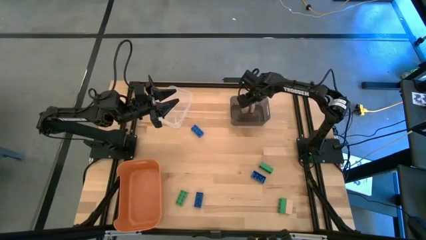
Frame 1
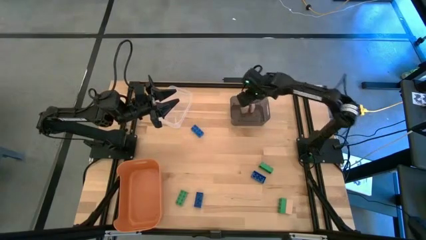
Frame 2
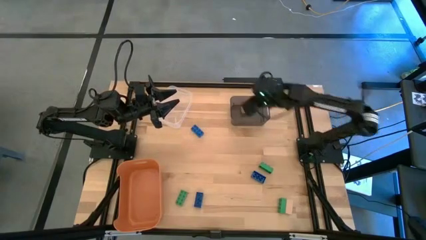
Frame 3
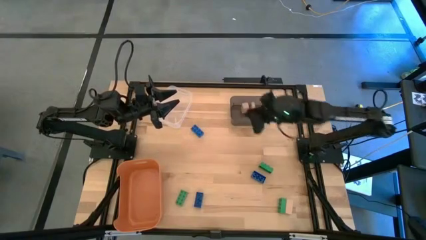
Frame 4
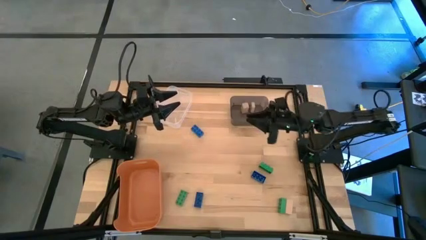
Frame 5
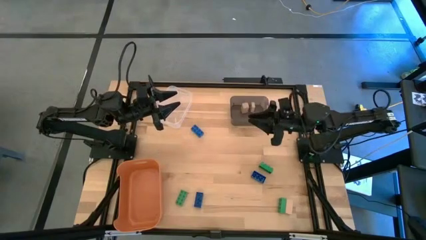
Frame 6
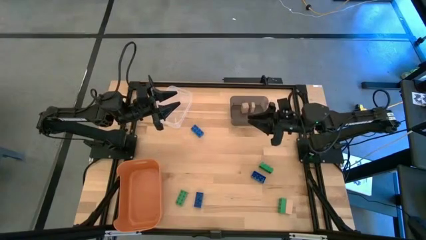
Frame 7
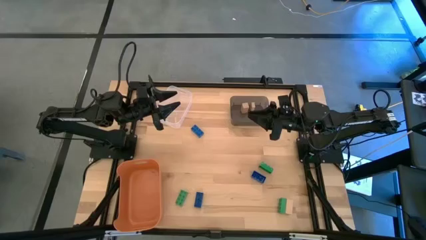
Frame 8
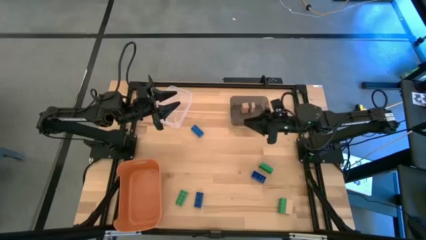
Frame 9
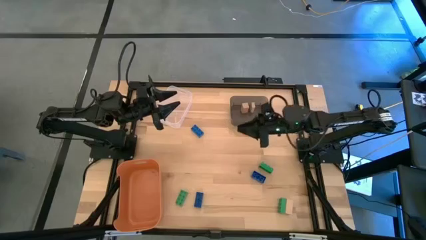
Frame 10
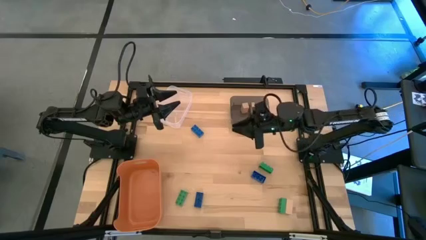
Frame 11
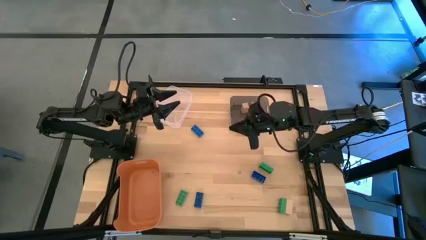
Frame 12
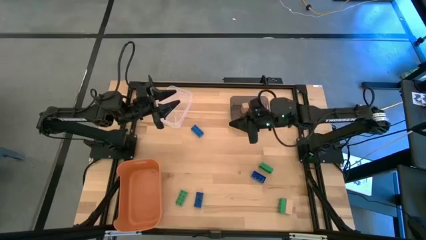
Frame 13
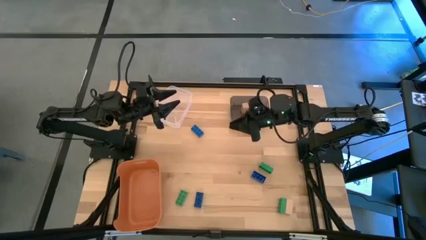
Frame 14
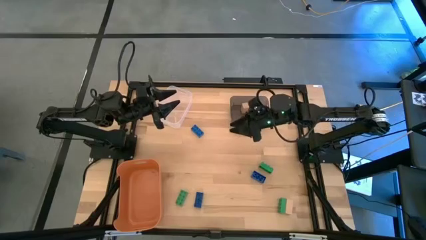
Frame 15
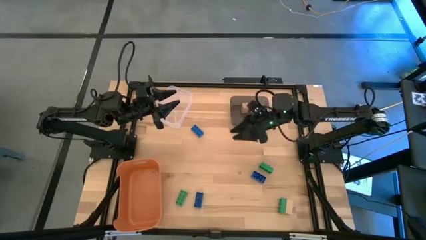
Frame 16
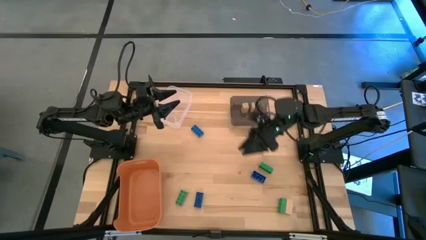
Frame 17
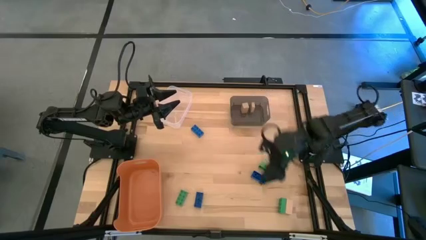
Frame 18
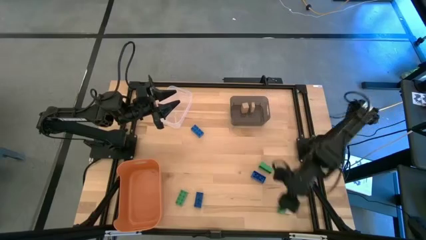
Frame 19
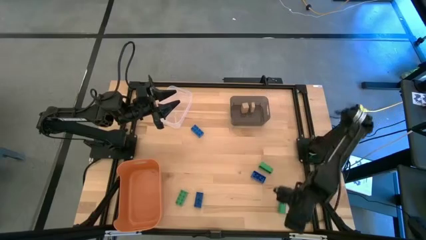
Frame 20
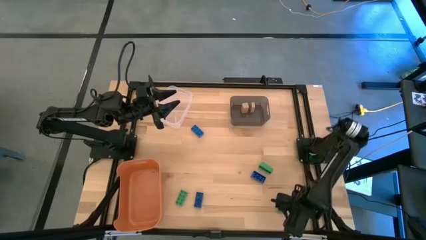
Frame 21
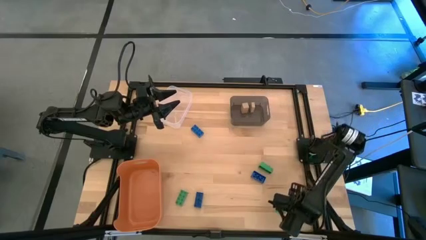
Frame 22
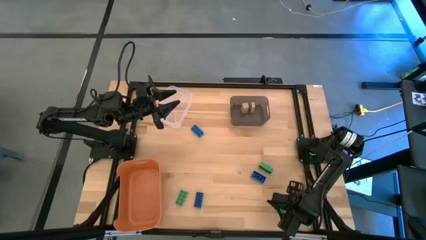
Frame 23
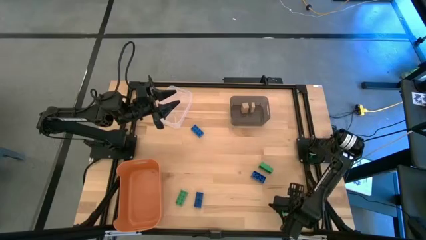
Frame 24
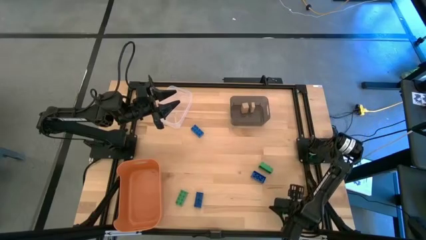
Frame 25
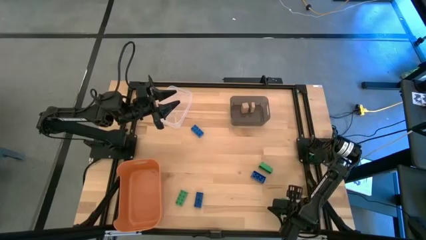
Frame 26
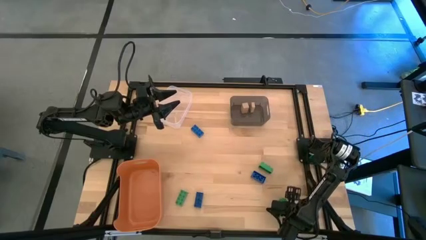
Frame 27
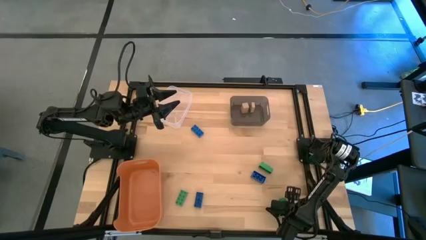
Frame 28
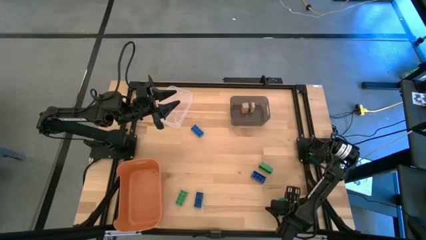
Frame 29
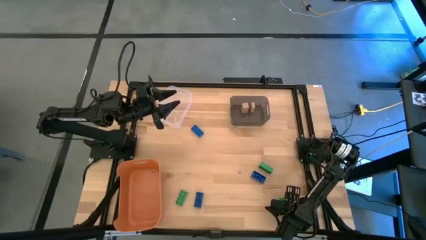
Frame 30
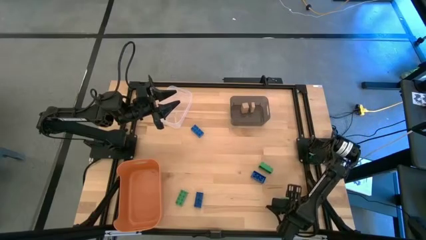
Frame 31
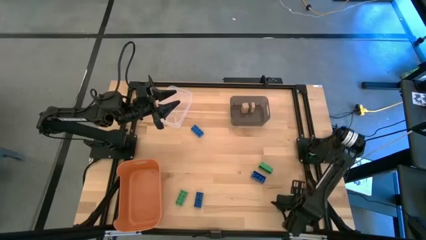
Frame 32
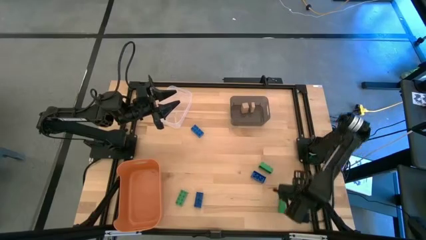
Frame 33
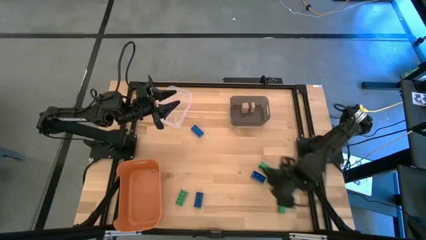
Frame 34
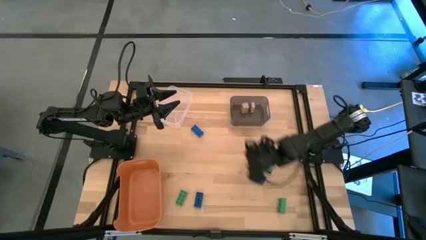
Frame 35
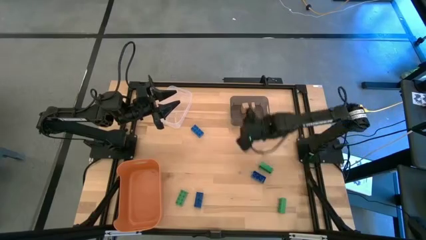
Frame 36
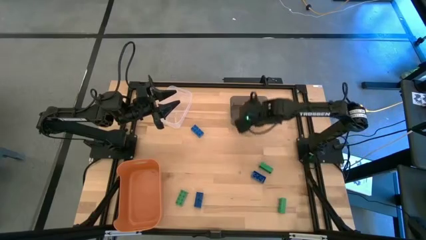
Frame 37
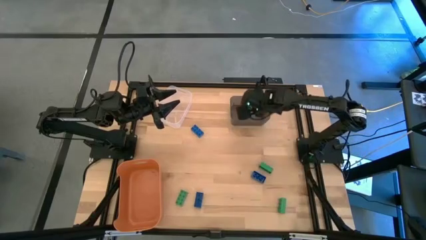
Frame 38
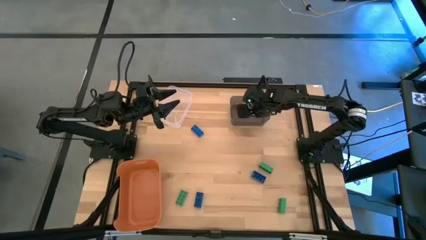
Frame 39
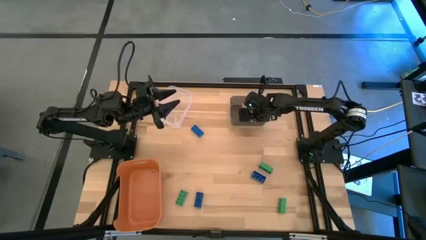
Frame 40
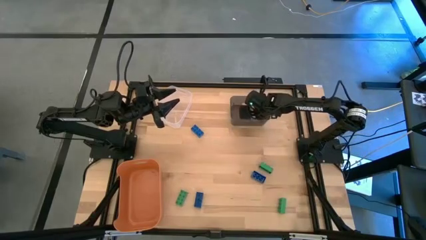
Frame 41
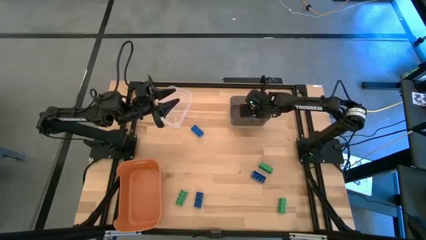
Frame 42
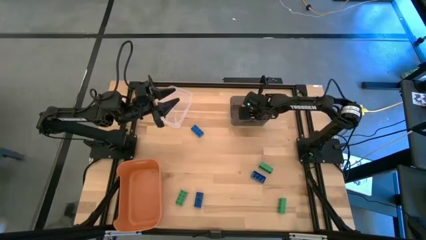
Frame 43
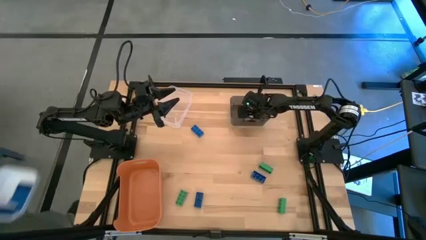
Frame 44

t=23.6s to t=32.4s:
Task: Sort & place blocks by color
Put the brown block into the black bin

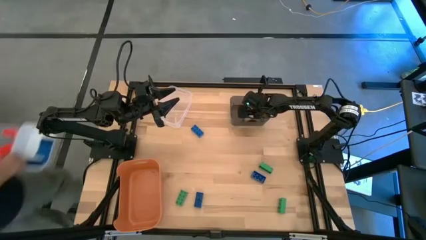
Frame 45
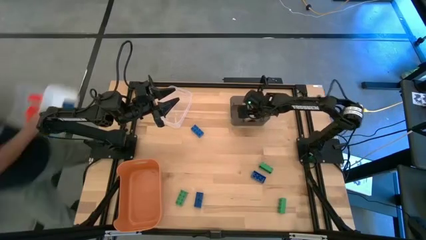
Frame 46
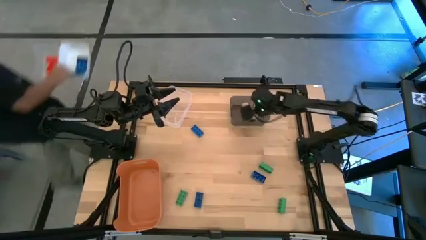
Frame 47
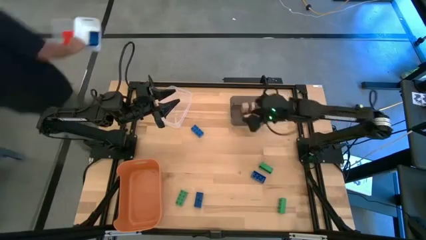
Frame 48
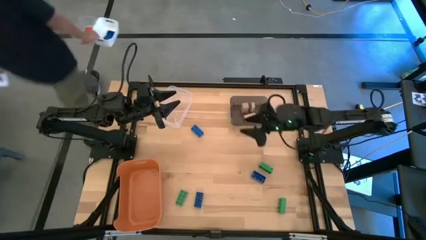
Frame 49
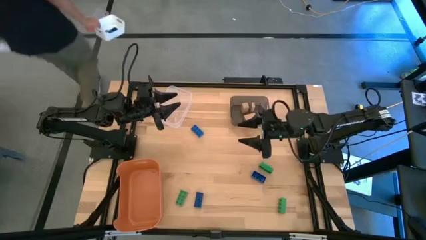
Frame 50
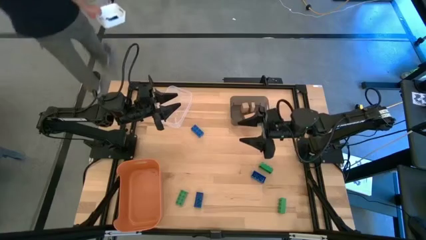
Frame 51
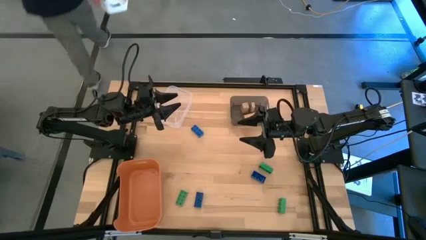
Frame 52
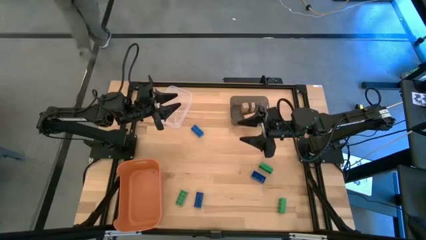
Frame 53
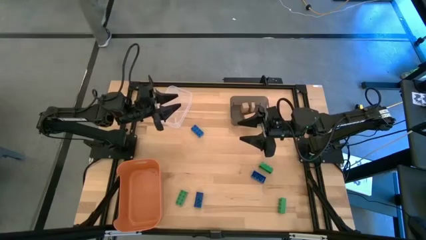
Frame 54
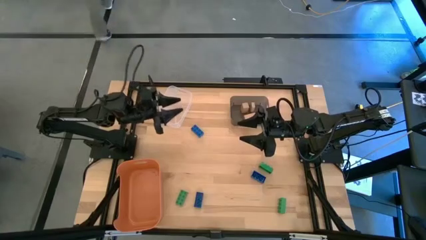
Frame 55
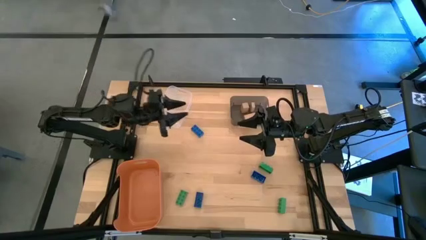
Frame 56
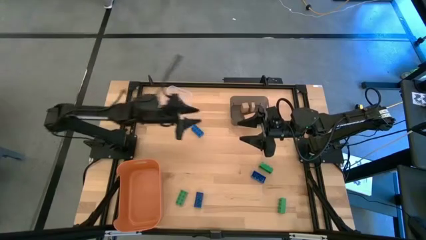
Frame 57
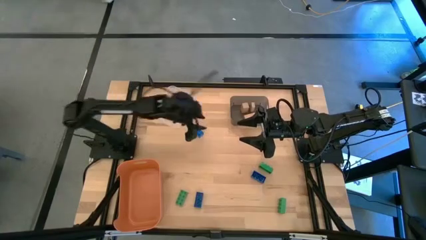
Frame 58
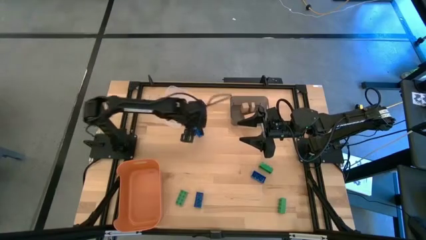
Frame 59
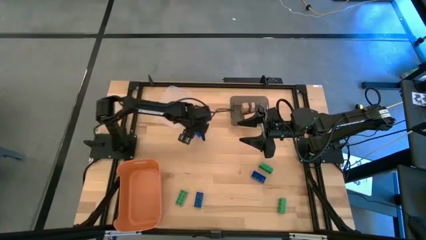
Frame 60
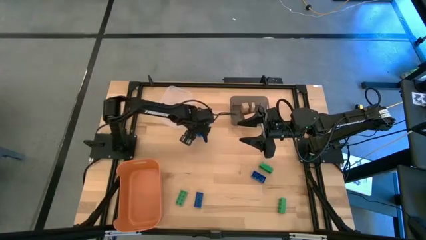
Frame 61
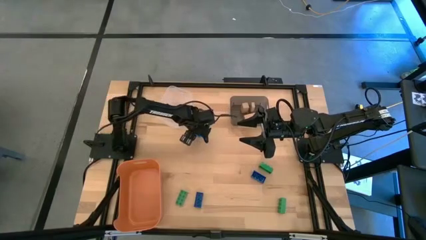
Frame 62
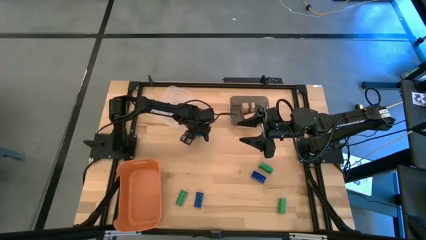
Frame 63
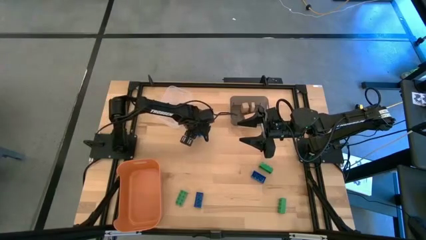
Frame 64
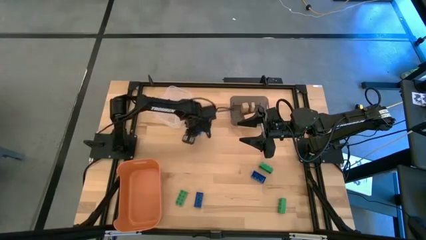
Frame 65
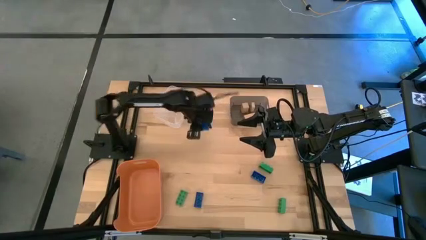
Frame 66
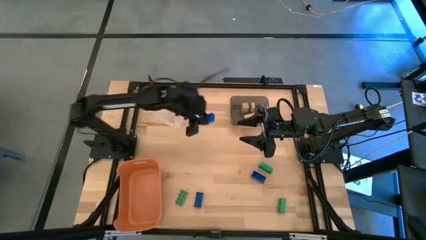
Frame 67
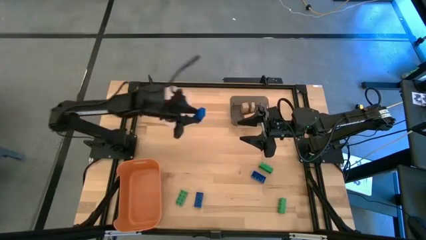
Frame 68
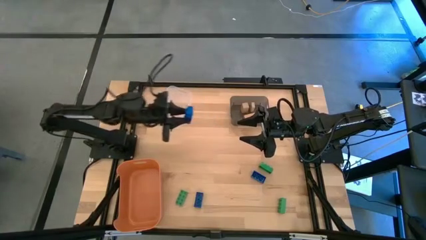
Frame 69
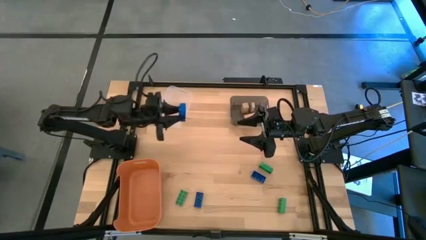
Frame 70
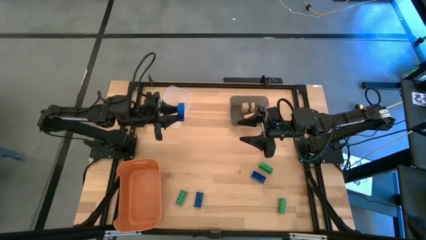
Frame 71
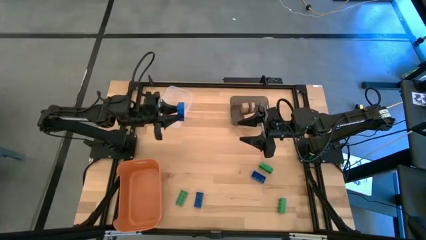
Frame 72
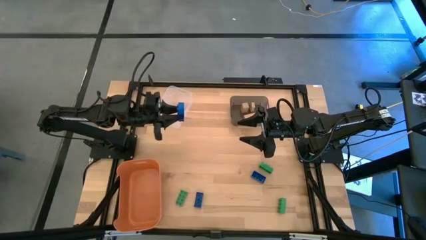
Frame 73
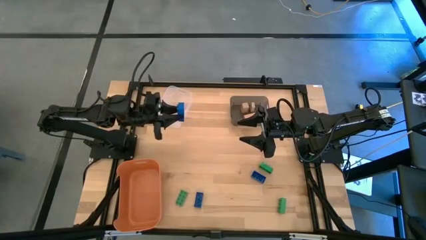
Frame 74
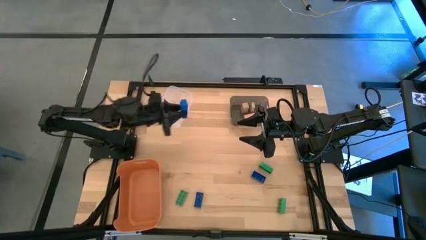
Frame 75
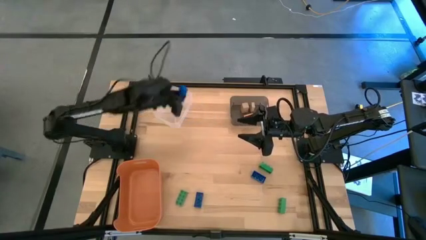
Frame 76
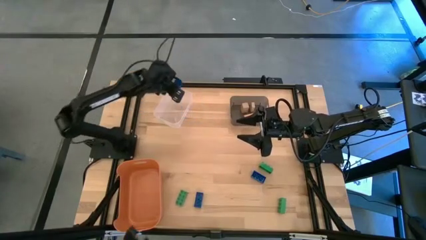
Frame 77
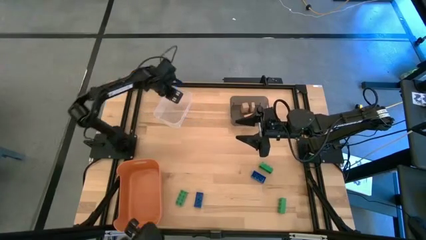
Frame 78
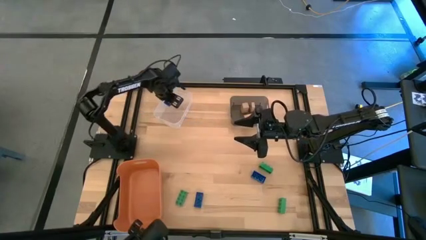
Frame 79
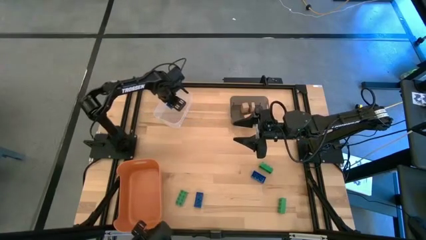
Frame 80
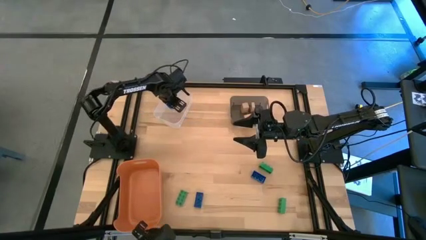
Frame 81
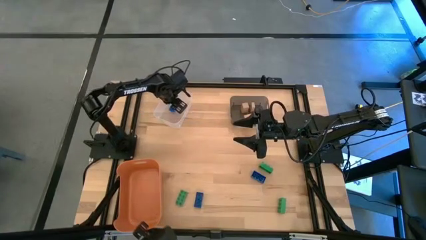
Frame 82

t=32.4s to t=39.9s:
Put the top right blue game piece into the transparent bin
